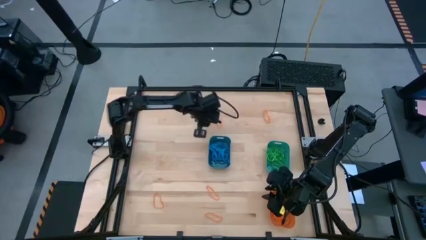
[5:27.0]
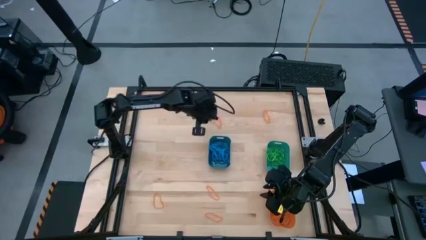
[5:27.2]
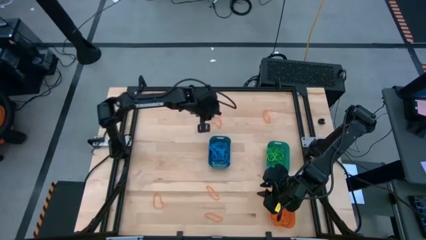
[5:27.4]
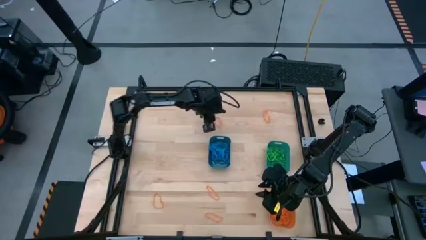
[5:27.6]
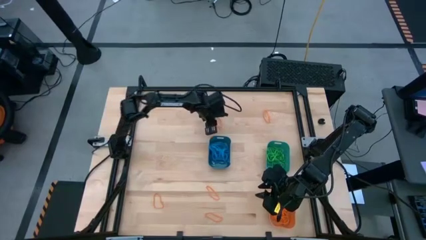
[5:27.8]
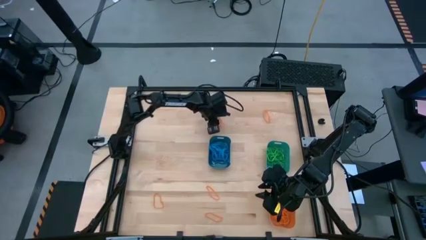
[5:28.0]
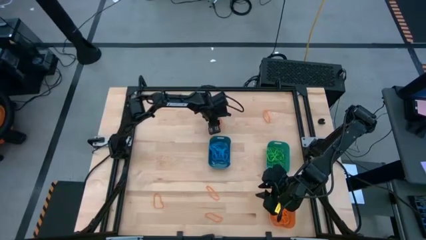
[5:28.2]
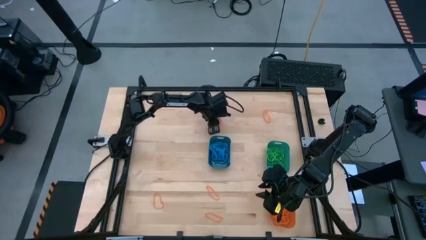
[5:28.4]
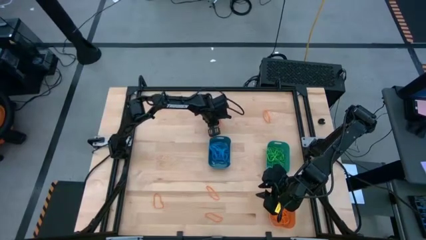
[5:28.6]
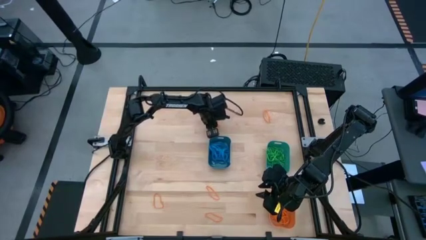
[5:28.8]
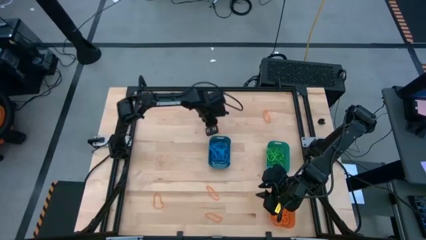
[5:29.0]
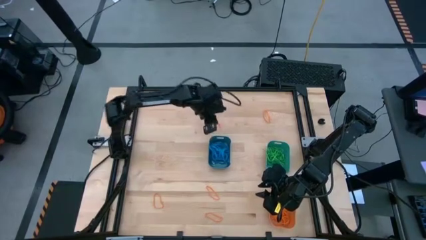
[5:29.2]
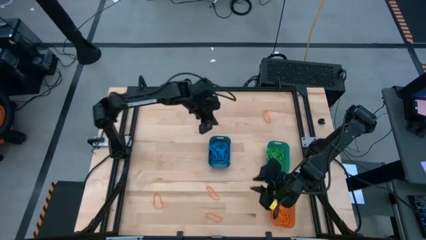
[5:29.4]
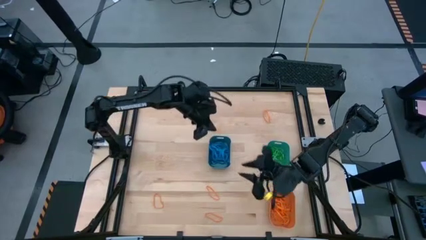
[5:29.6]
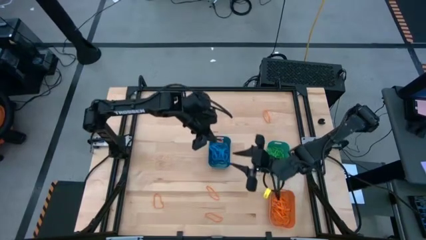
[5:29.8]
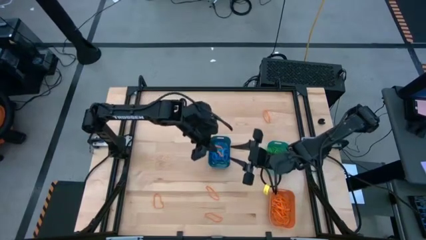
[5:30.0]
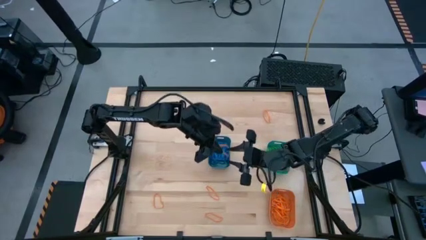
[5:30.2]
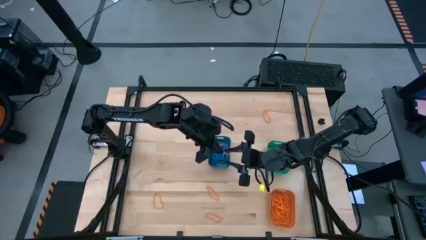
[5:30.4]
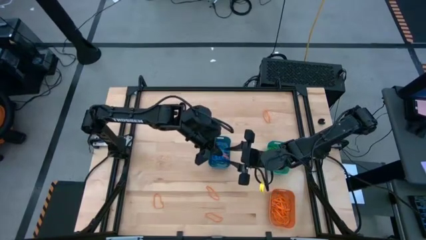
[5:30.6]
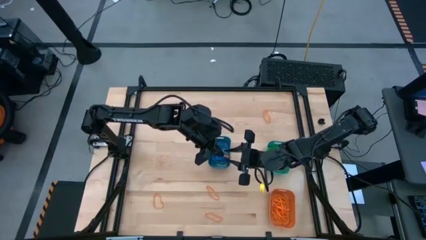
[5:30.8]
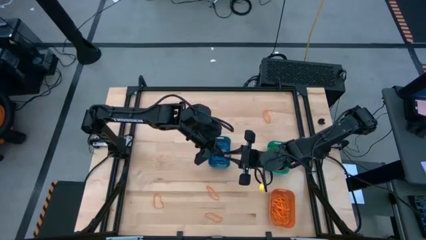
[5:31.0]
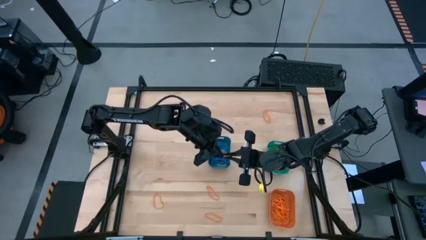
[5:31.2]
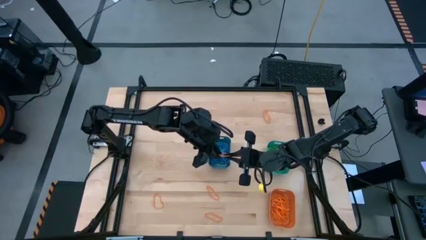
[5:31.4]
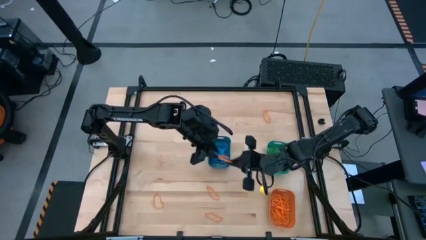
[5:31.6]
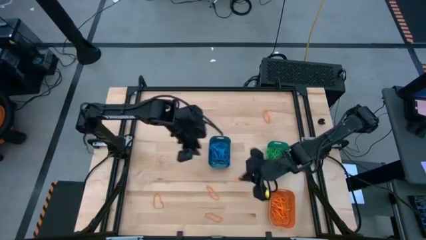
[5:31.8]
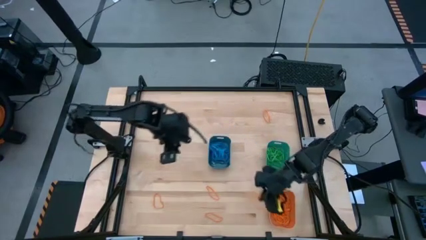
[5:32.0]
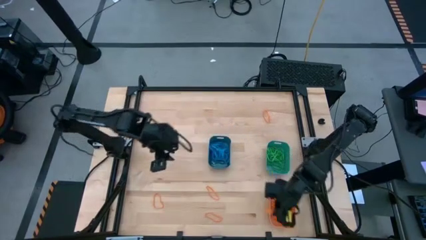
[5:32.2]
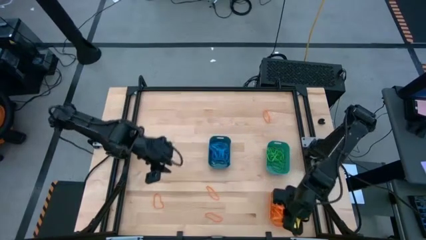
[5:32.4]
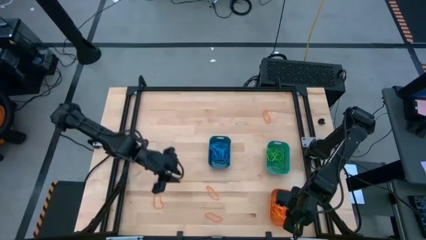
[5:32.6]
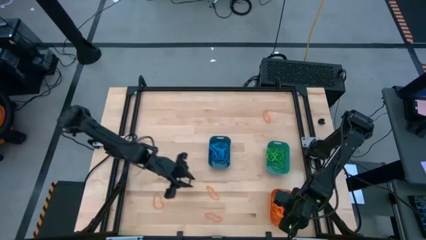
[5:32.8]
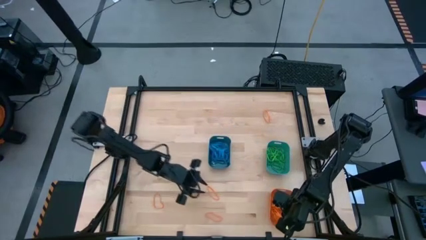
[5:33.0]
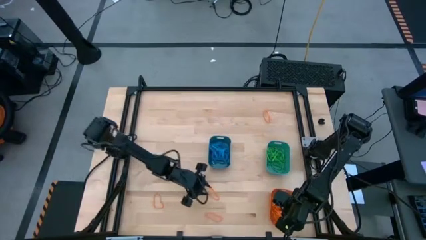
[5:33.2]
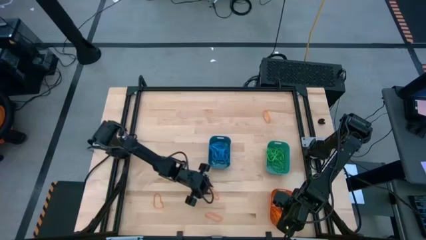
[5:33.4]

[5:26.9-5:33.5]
Task: Sort rubber bands into baskets
Put the orange rubberband into the orange bin

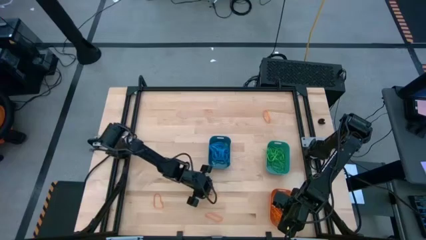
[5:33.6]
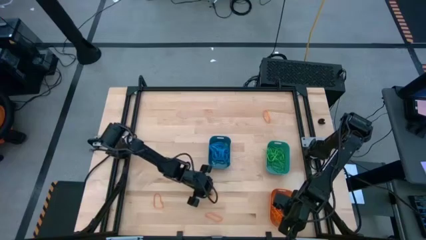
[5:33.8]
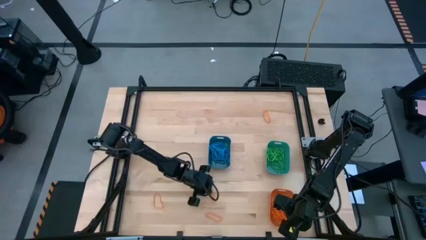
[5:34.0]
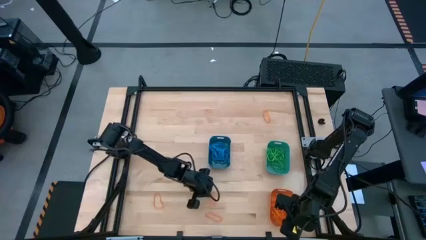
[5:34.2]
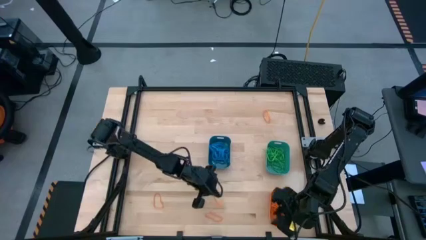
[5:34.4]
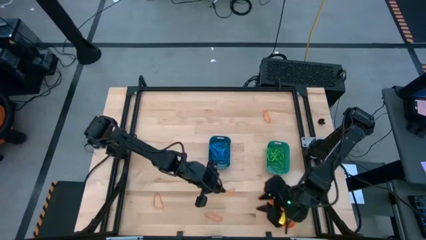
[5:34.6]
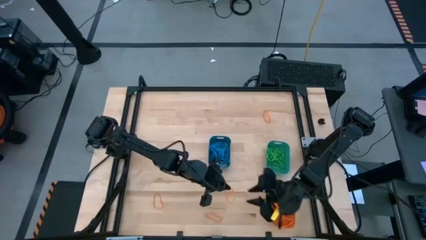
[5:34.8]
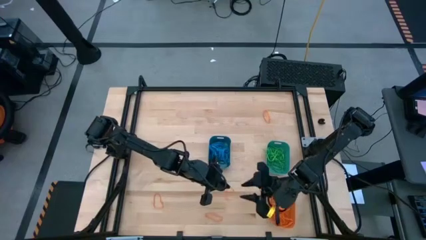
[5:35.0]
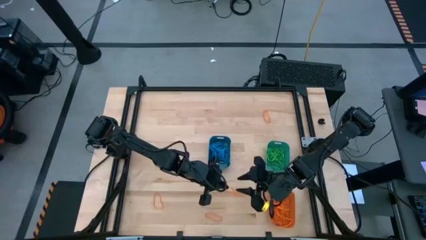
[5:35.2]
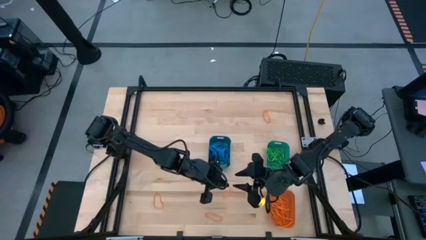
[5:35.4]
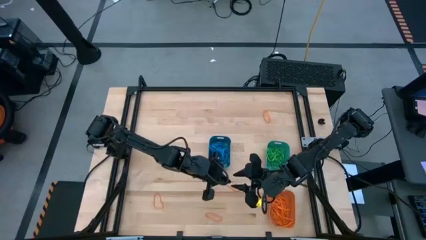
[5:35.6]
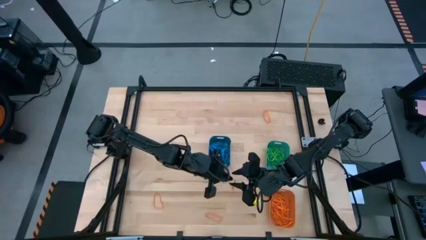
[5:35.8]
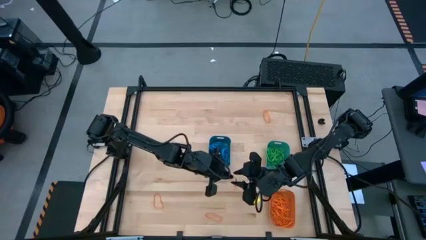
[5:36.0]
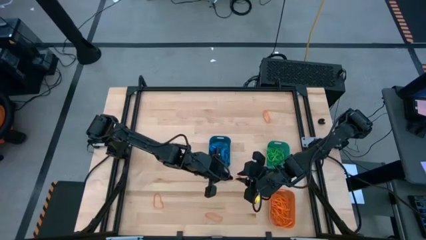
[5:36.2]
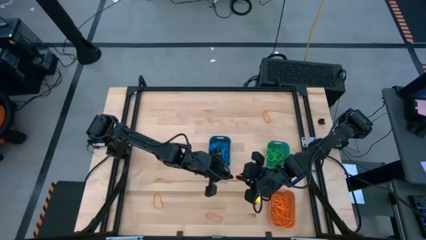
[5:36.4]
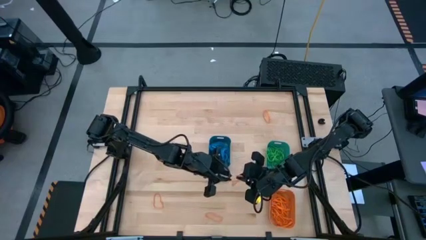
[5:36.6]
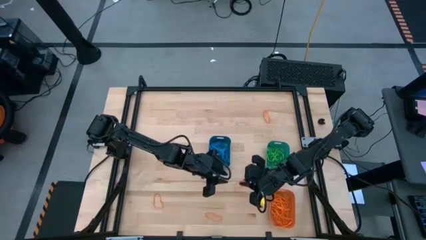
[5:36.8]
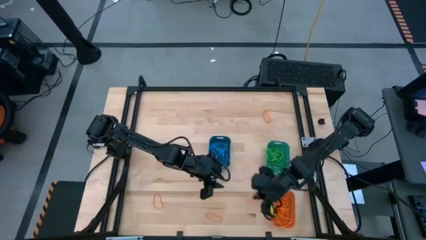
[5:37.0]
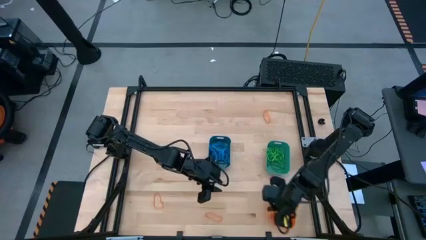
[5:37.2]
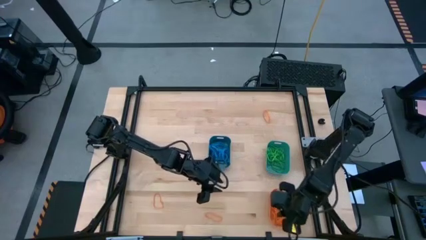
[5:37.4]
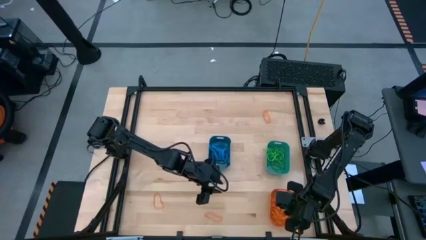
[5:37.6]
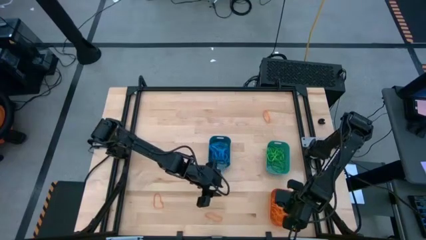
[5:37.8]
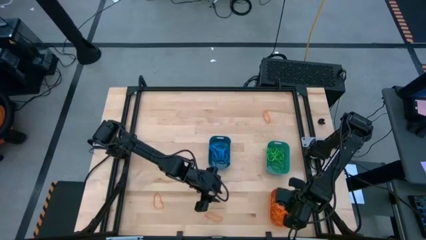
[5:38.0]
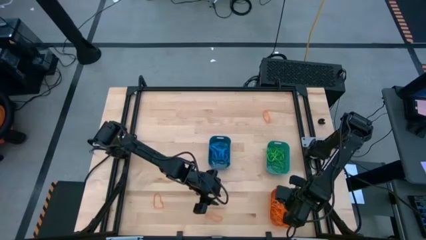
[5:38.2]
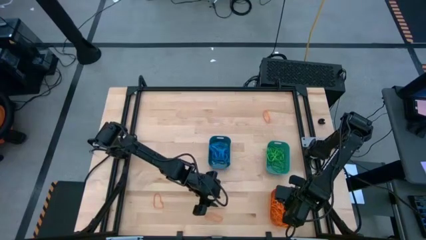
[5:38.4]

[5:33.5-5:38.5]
Put the orange rubberband into the orange bin

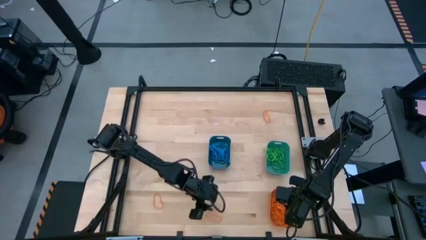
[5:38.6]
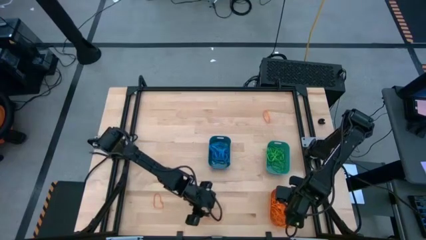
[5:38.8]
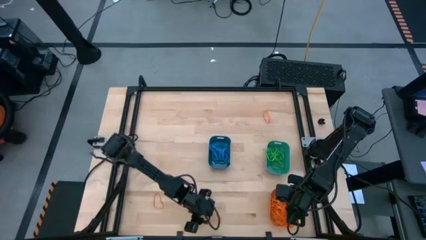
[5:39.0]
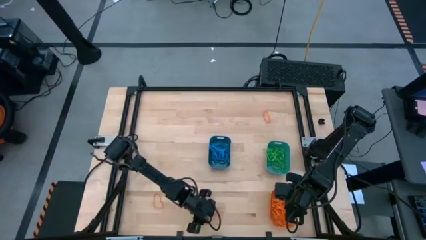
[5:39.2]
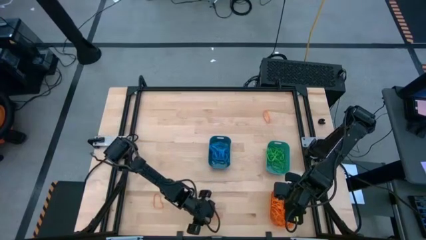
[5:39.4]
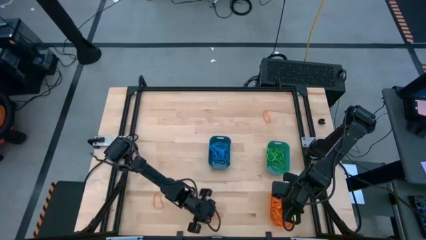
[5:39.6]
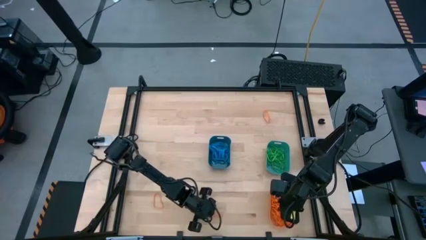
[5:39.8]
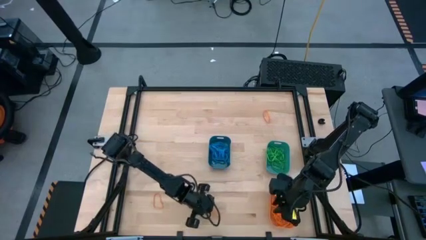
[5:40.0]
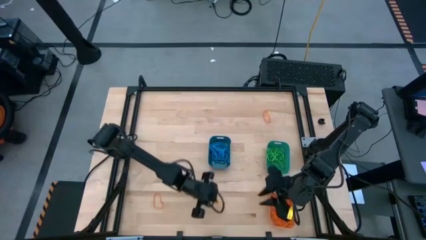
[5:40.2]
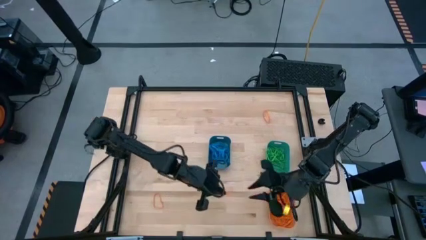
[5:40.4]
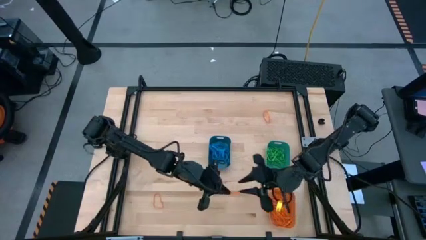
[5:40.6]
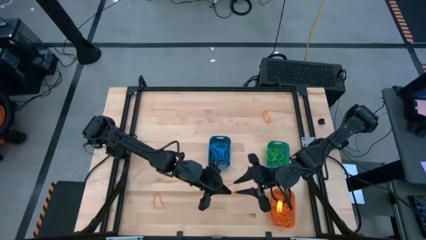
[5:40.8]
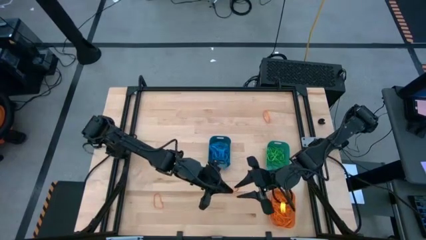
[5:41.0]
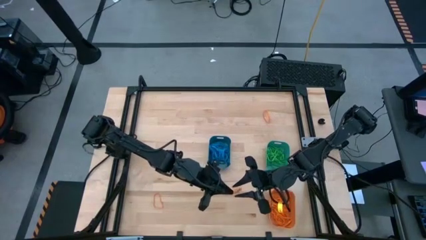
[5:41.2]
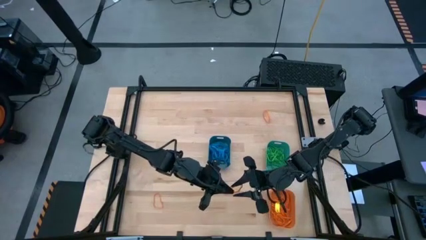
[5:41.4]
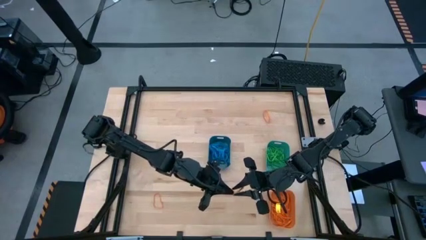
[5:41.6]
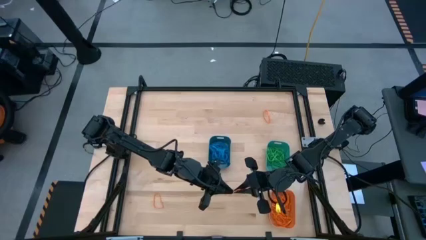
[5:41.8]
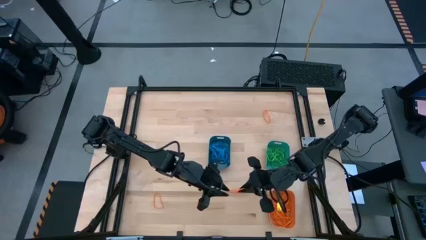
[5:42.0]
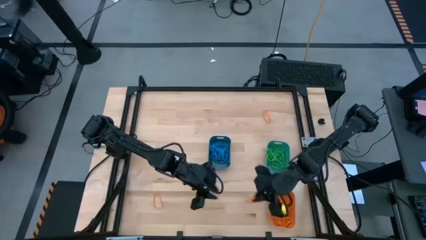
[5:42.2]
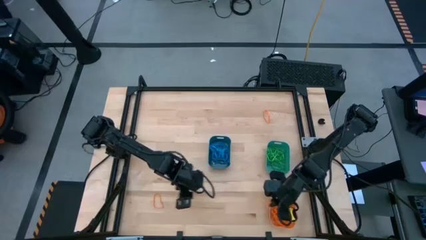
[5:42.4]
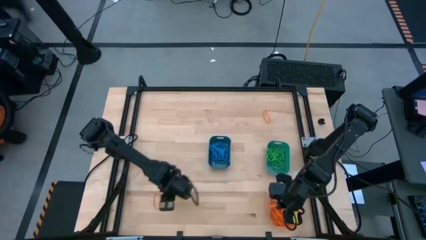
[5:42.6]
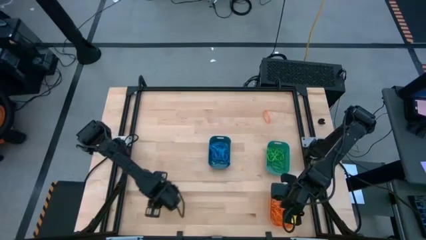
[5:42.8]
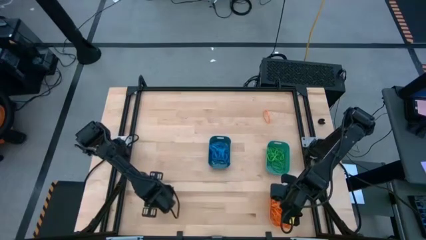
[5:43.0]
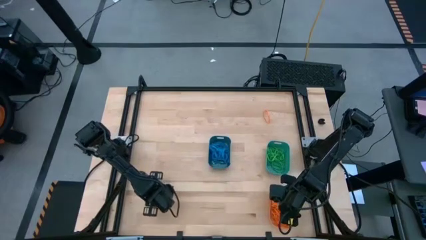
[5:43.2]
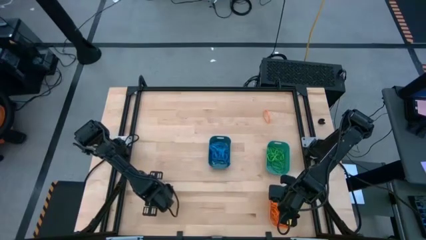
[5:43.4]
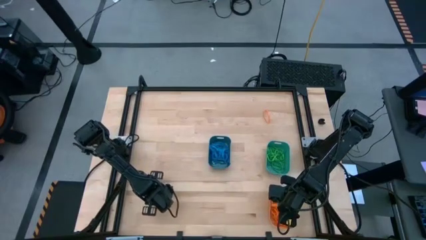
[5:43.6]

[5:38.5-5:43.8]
Put the orange rubberband into the orange bin
